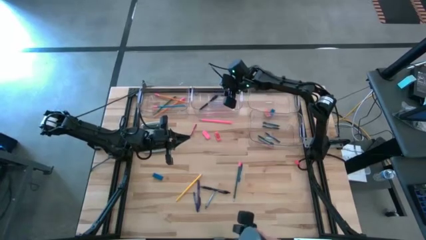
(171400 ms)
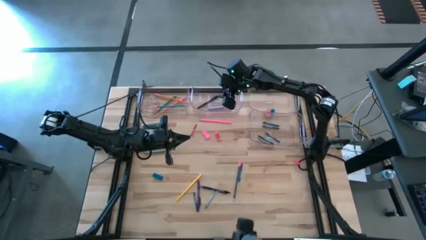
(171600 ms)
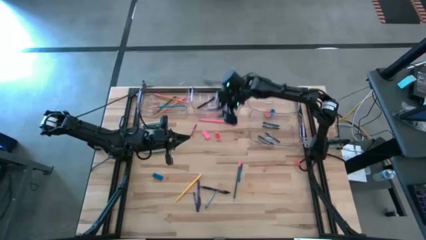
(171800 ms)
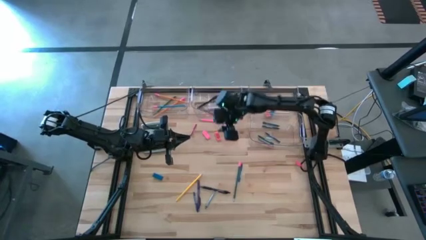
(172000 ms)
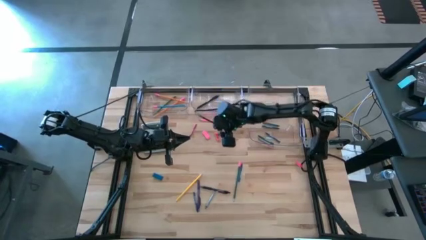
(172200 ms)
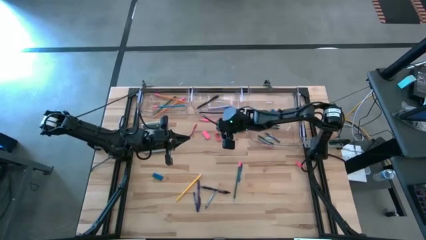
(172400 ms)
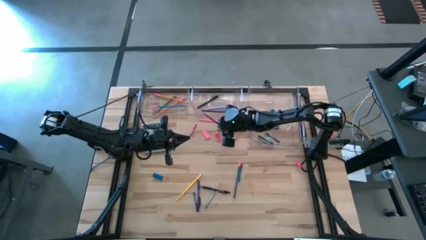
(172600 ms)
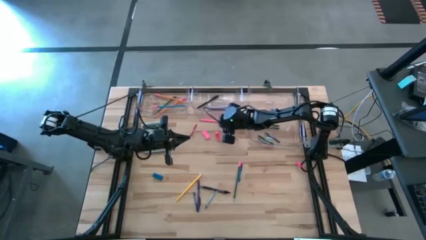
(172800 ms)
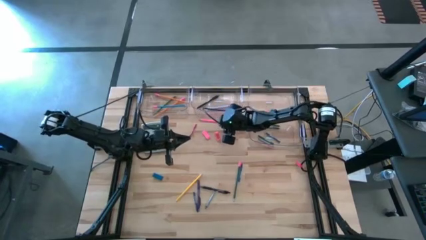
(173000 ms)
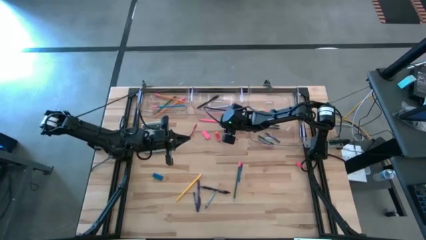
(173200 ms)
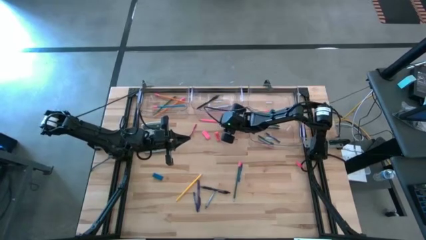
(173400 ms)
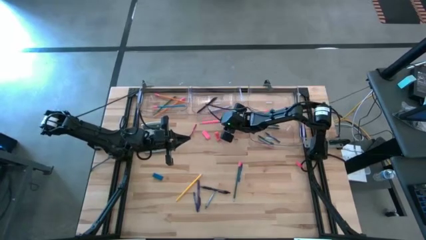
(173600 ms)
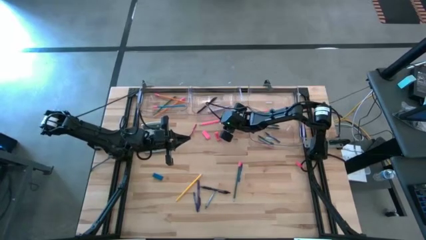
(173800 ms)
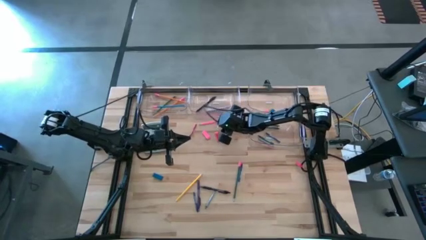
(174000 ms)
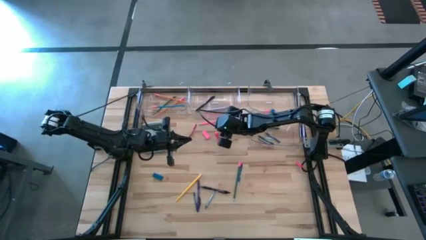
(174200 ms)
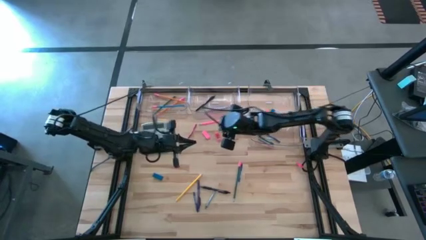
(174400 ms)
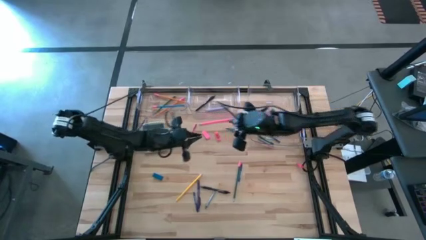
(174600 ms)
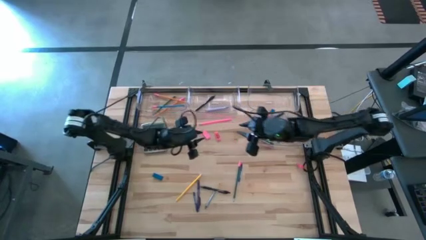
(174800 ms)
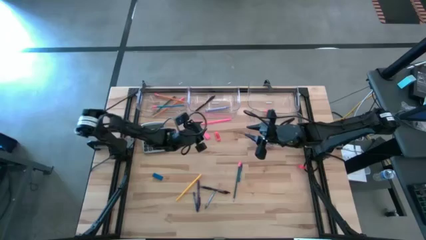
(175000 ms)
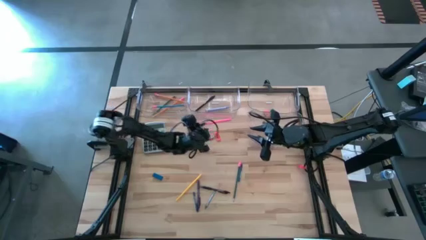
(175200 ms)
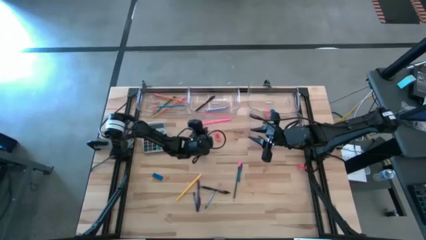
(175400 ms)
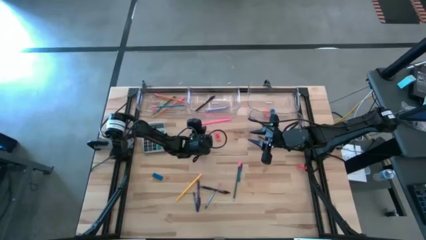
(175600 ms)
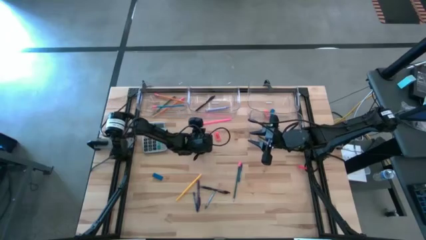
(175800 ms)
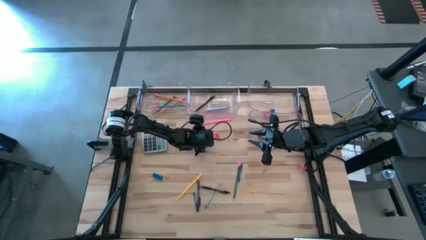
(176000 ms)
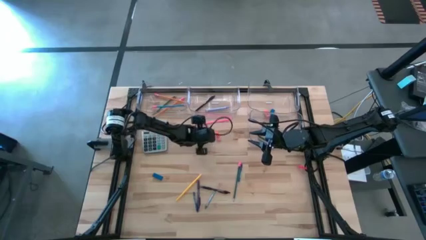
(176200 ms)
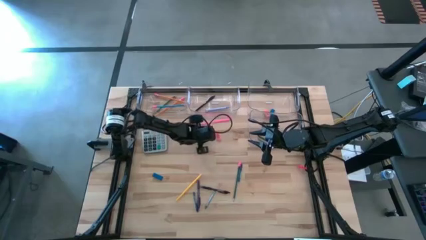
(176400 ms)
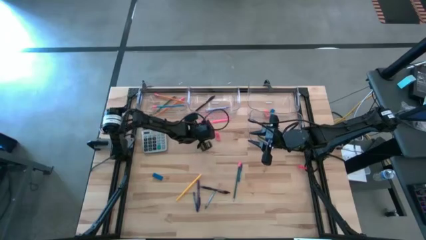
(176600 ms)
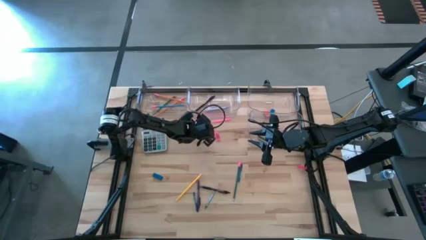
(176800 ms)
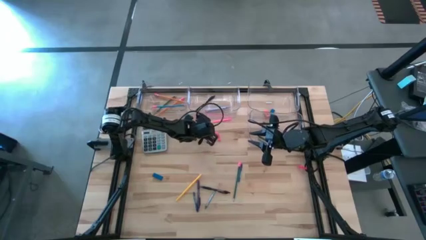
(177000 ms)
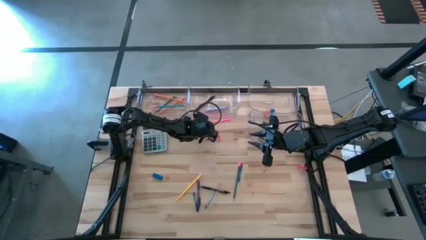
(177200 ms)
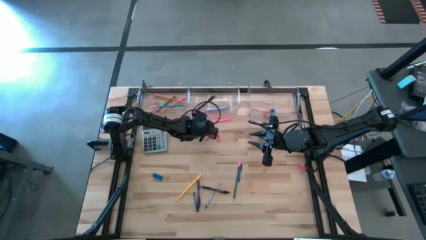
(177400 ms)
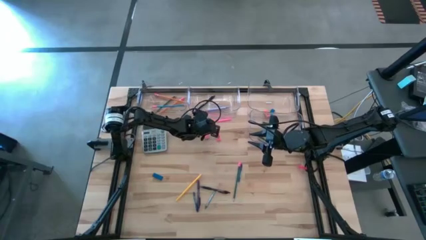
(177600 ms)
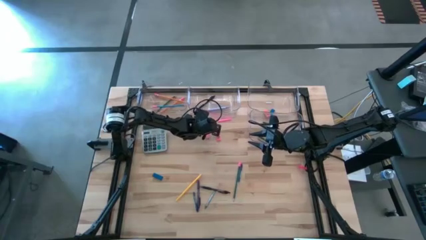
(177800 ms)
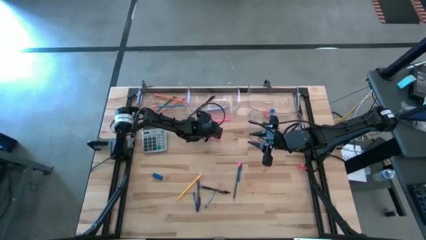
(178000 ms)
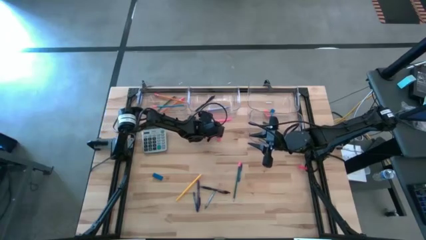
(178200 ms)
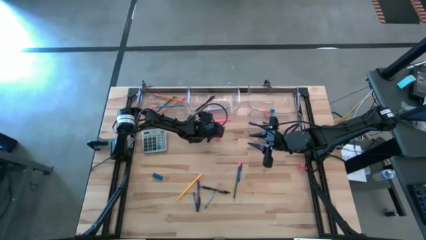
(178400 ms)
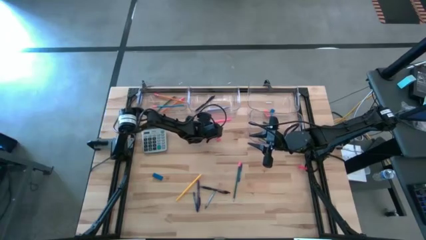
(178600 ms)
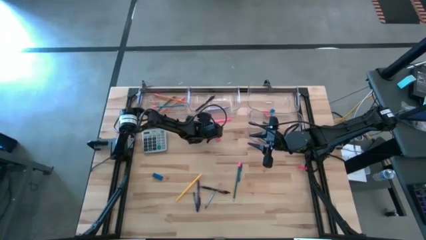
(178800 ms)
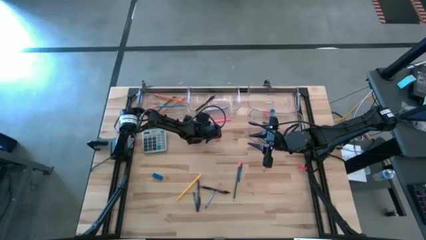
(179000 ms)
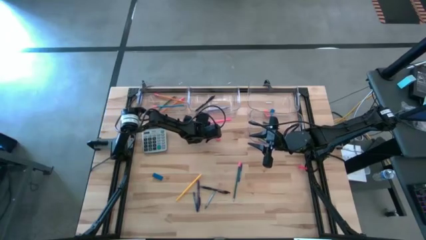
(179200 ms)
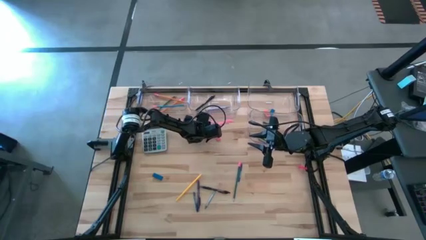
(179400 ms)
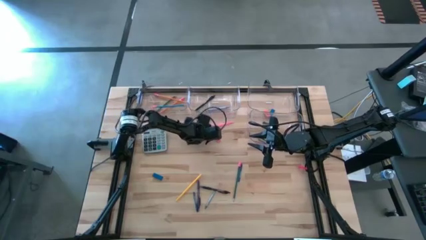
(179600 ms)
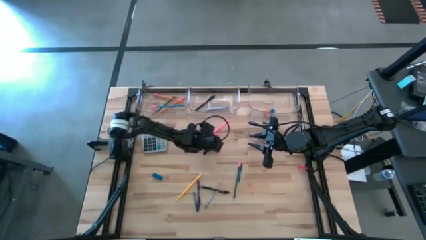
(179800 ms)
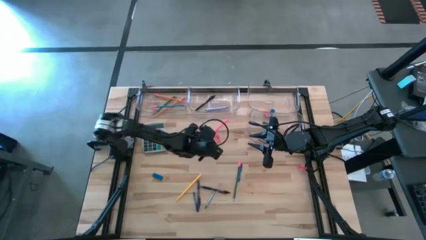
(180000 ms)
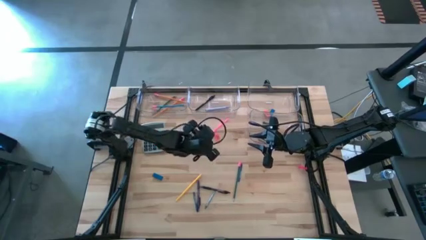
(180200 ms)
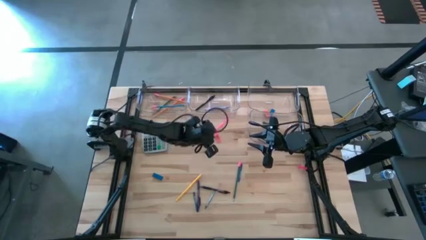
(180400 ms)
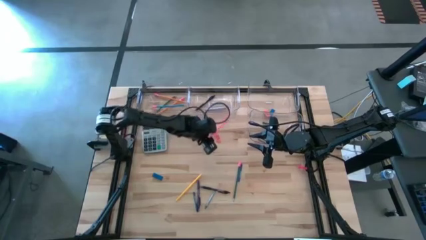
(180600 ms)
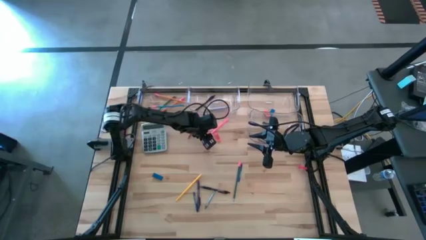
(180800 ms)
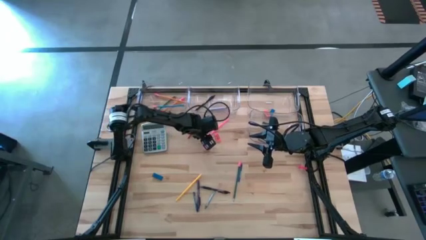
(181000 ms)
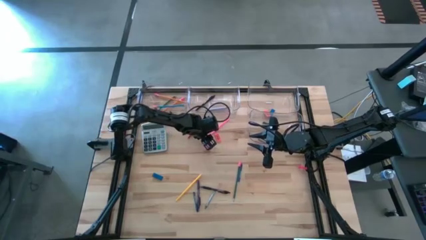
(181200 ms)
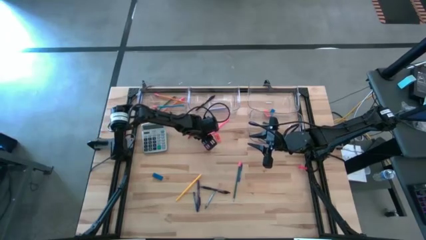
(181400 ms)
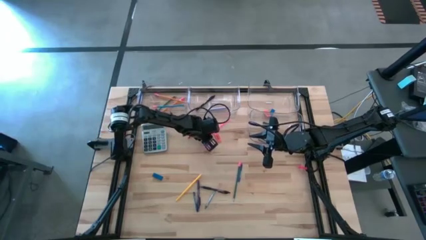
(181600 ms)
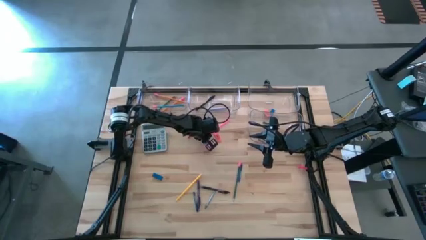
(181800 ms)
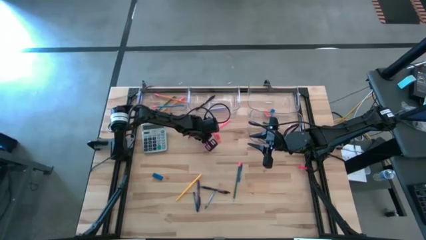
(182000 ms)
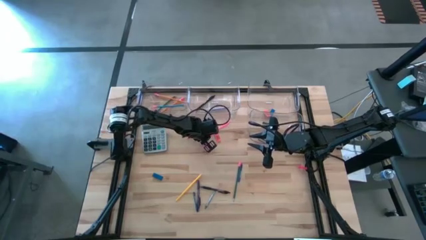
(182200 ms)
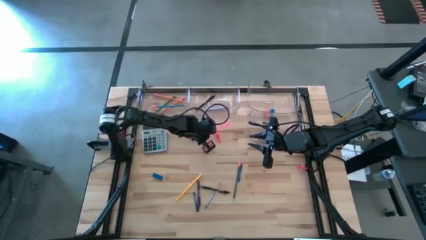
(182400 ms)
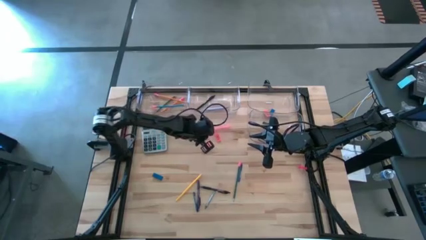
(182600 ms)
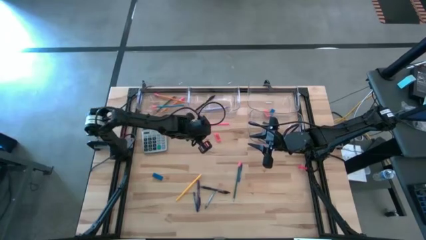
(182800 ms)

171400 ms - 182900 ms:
Task: Sort crayons/erasers/pens/pencils in bins
Put the pink pencil into the top left transparent bin

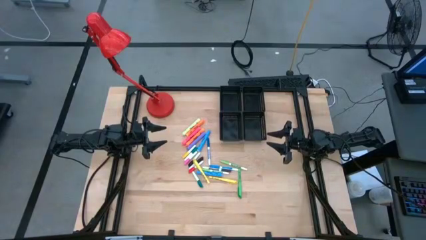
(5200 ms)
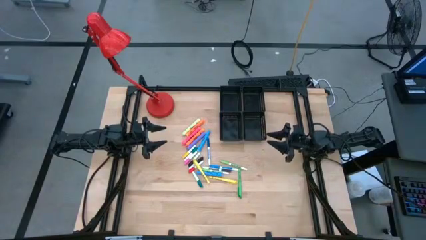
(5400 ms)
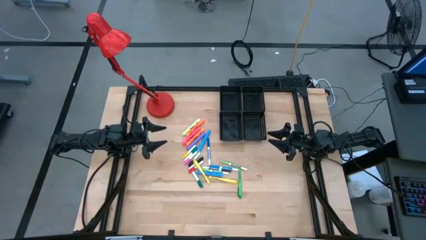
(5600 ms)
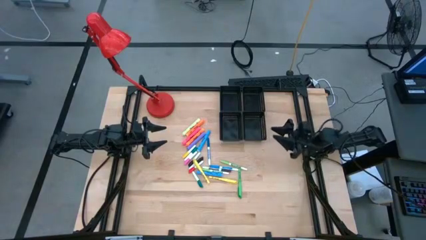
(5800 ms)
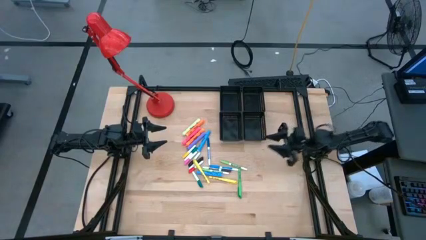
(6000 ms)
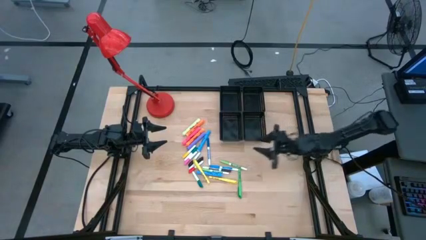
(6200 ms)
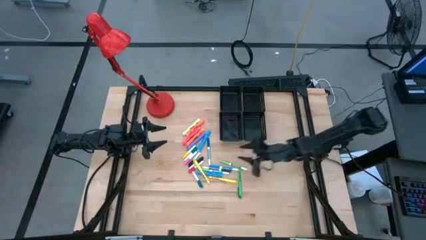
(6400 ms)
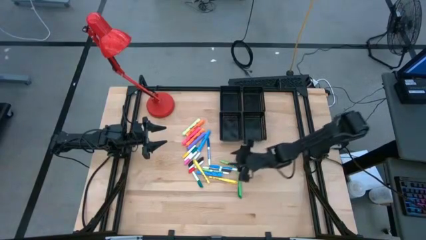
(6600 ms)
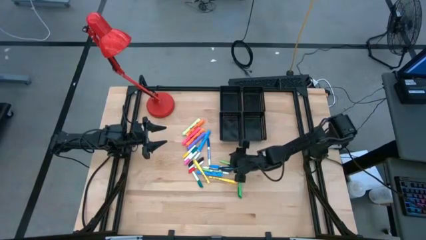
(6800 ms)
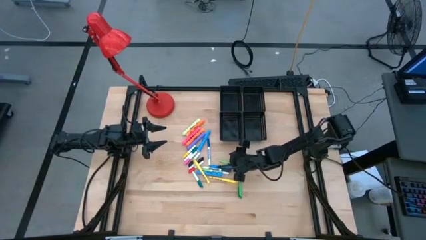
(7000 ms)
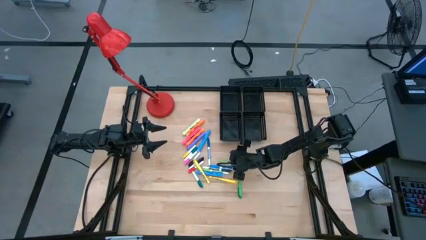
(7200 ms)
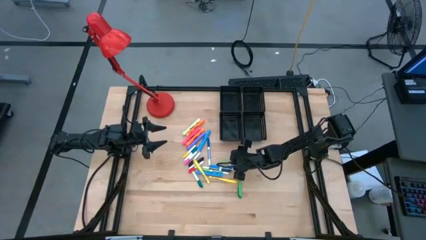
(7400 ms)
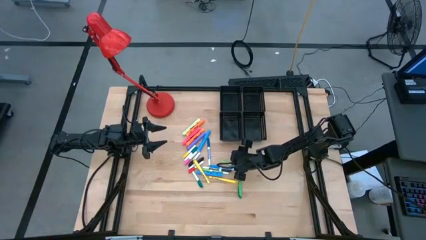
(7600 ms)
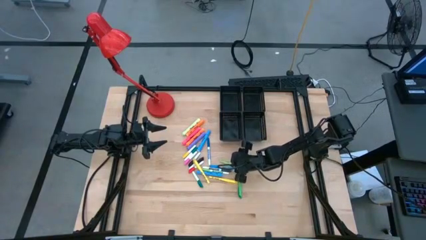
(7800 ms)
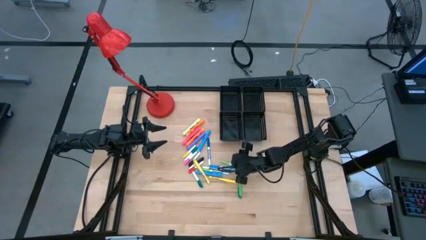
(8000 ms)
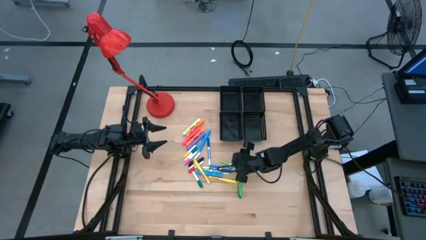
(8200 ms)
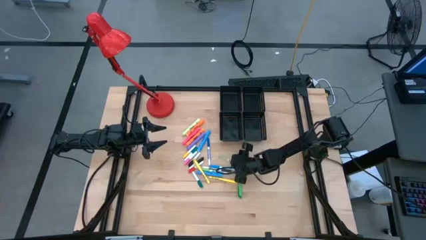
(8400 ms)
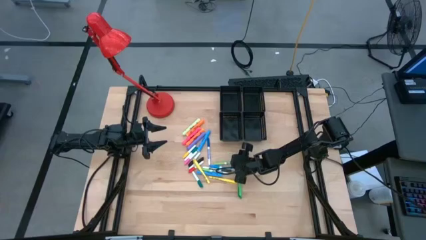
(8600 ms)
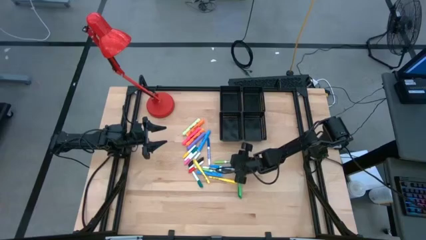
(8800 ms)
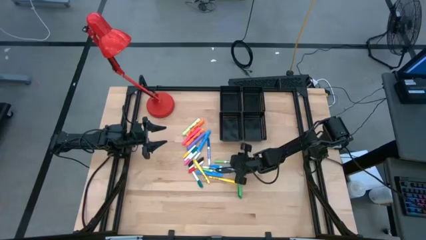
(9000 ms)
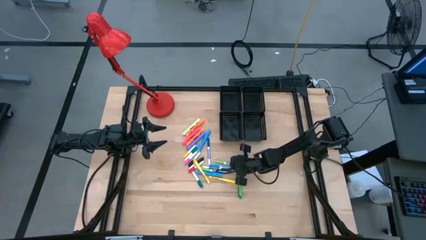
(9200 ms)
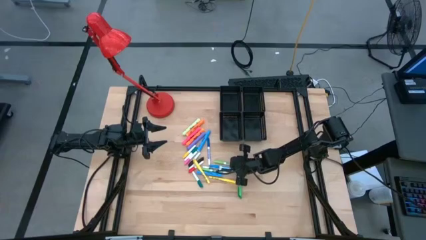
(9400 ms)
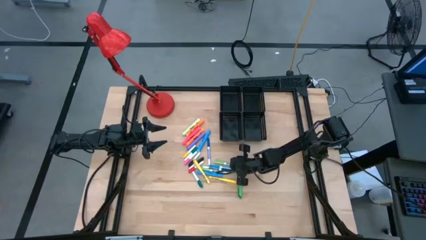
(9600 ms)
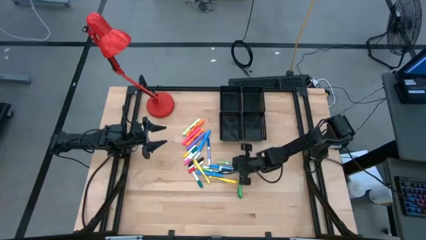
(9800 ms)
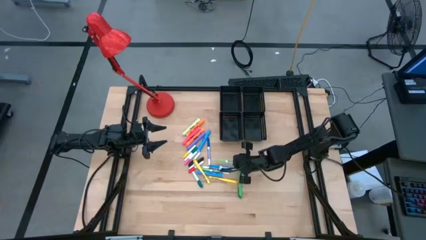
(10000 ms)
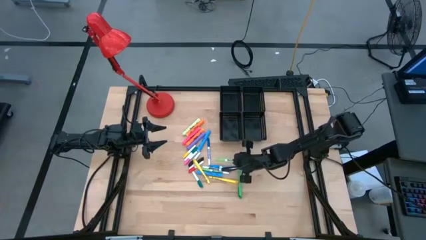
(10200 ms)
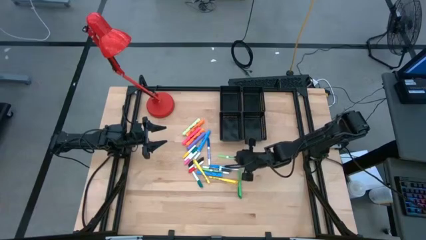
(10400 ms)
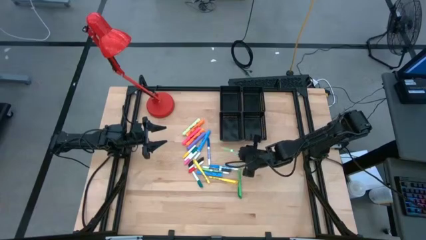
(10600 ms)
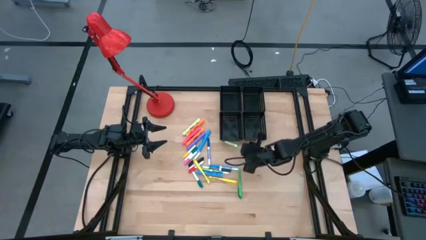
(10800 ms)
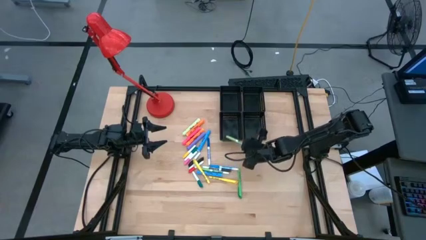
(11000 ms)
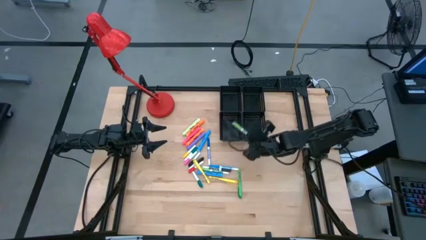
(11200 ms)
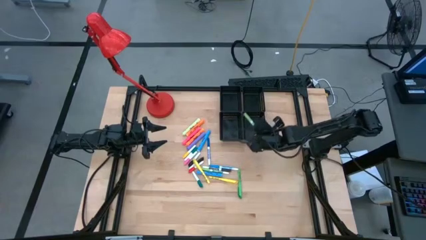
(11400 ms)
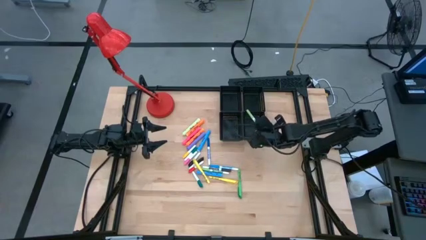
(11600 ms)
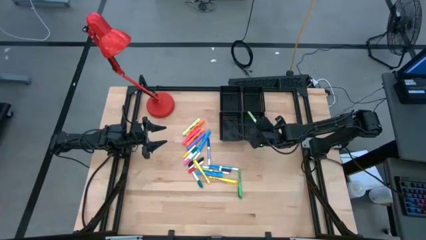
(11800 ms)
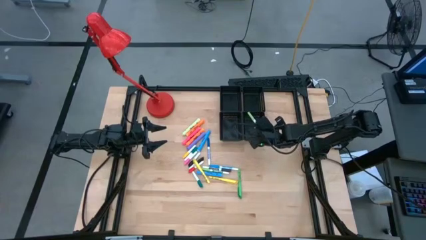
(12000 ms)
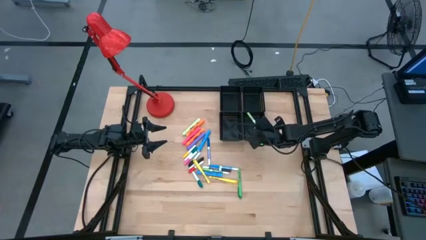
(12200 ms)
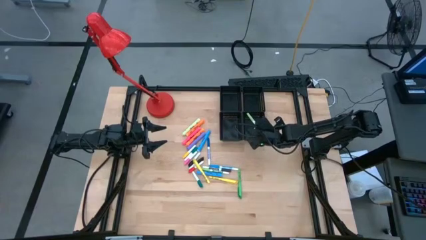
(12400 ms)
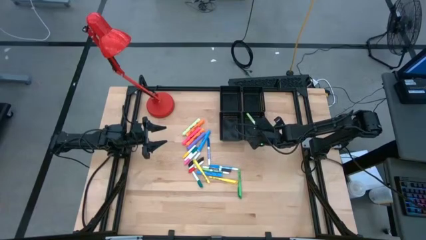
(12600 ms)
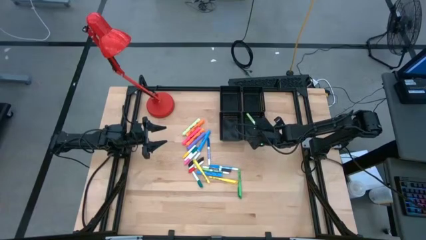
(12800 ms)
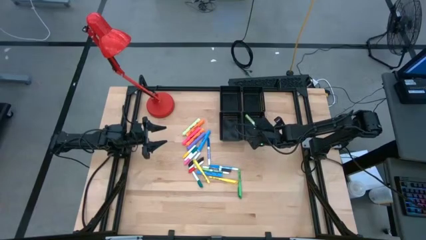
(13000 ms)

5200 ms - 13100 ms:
Task: Pick & Place Markers
Put the green marker pen into the bottom right black bin
